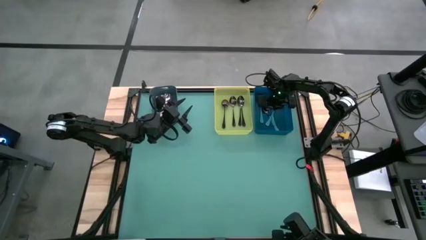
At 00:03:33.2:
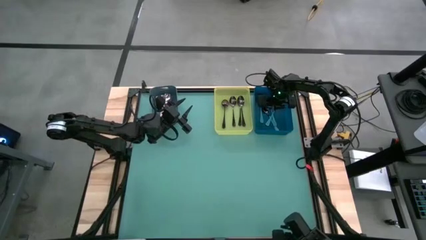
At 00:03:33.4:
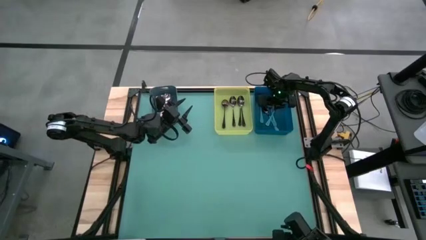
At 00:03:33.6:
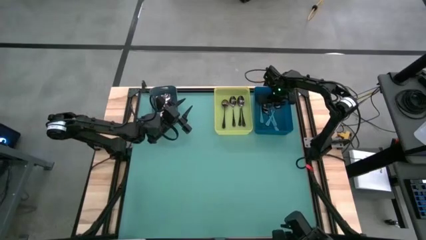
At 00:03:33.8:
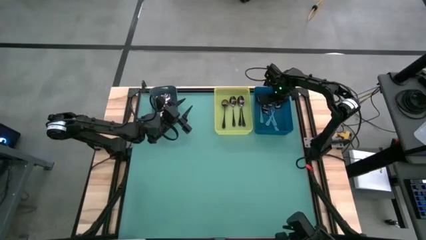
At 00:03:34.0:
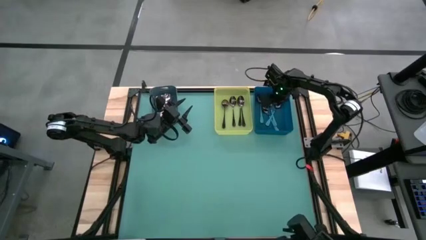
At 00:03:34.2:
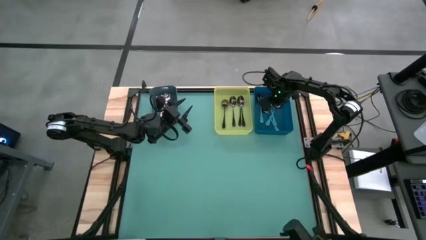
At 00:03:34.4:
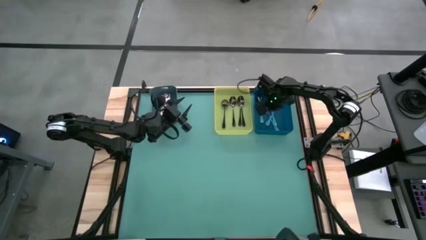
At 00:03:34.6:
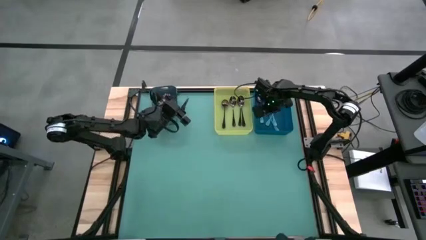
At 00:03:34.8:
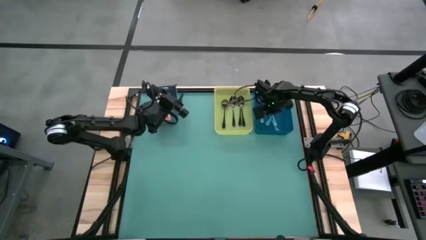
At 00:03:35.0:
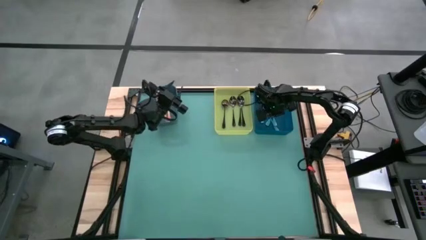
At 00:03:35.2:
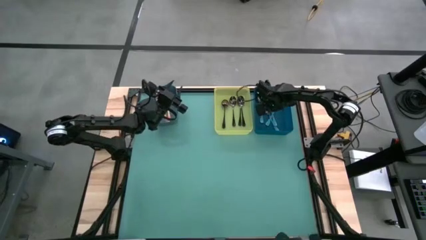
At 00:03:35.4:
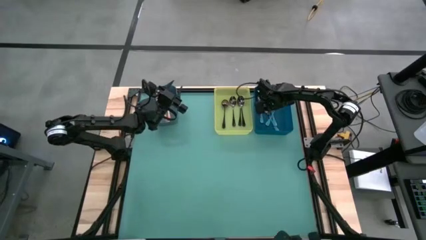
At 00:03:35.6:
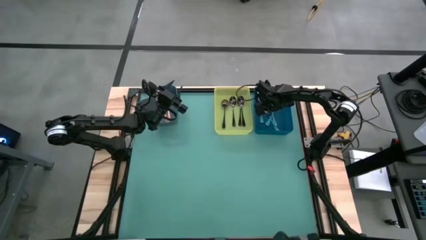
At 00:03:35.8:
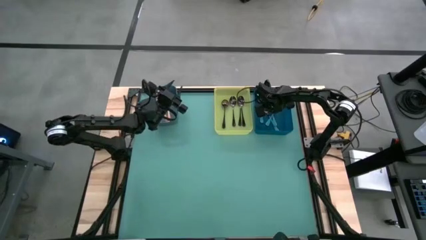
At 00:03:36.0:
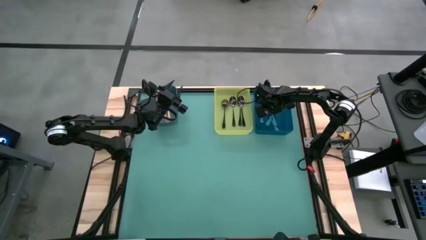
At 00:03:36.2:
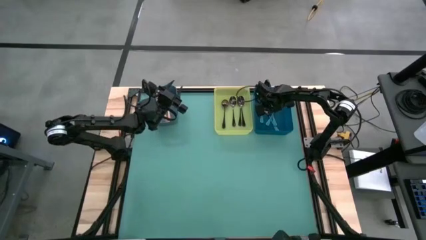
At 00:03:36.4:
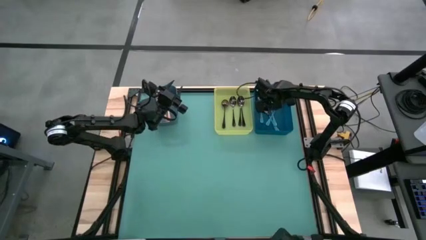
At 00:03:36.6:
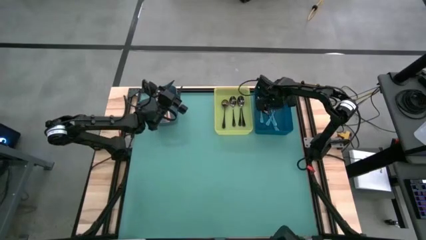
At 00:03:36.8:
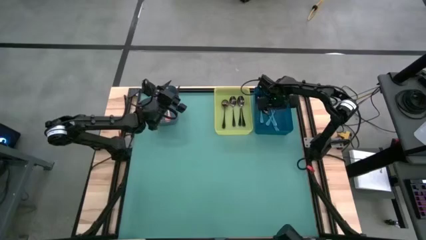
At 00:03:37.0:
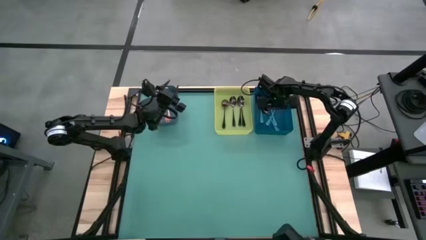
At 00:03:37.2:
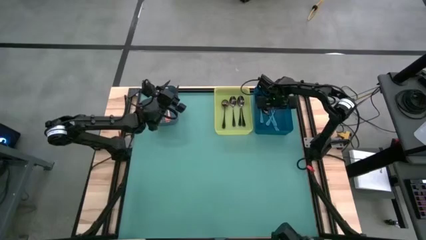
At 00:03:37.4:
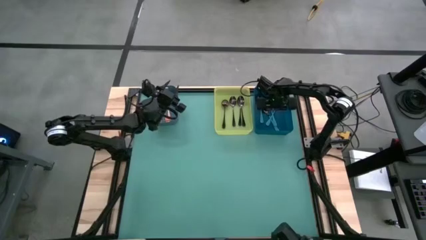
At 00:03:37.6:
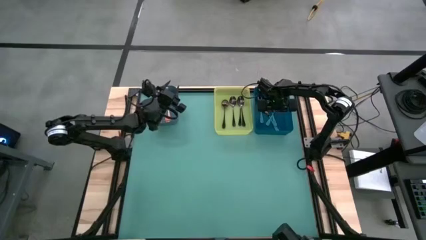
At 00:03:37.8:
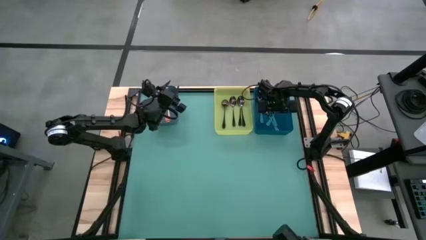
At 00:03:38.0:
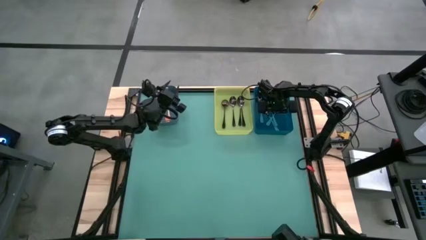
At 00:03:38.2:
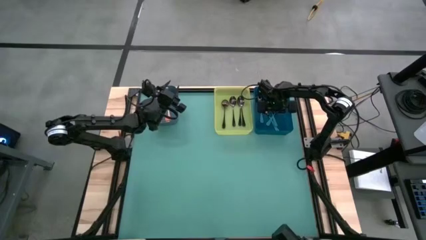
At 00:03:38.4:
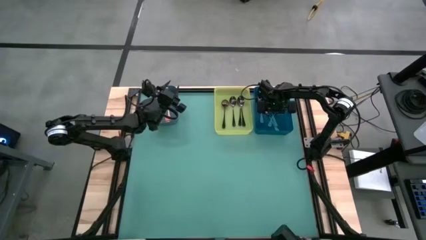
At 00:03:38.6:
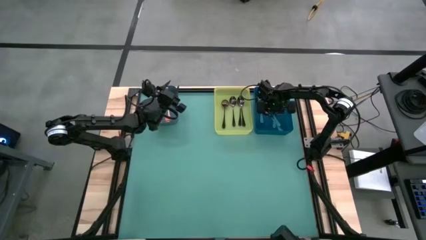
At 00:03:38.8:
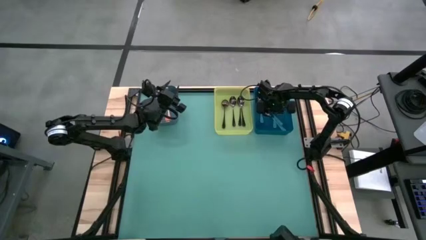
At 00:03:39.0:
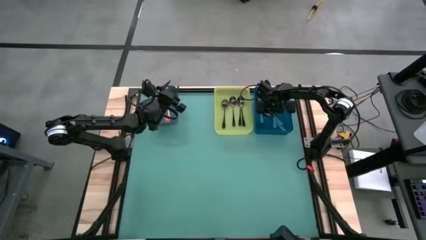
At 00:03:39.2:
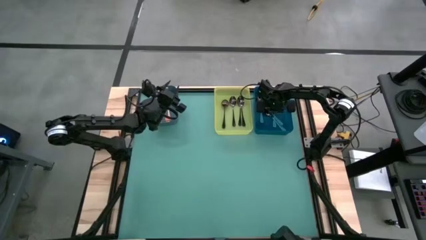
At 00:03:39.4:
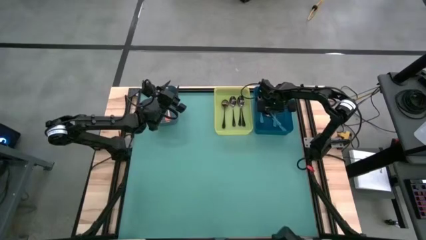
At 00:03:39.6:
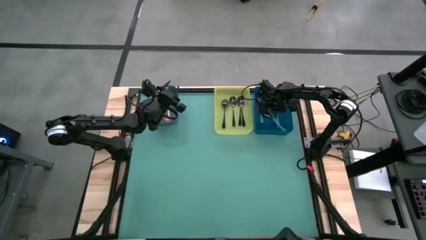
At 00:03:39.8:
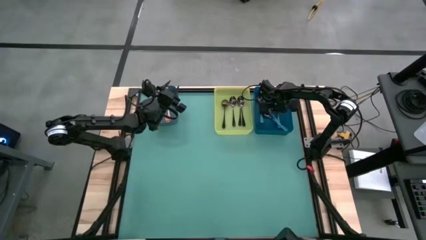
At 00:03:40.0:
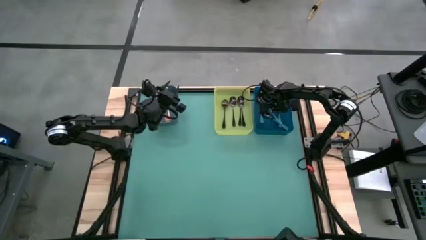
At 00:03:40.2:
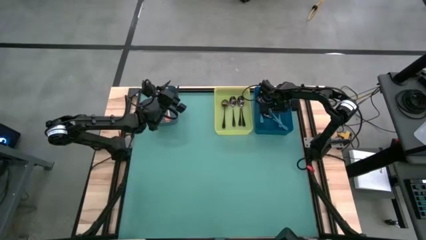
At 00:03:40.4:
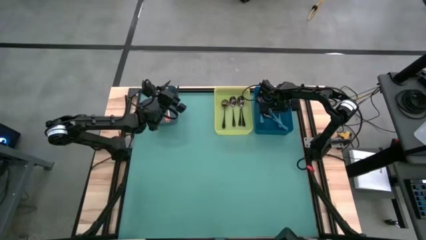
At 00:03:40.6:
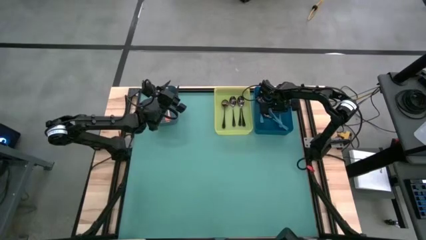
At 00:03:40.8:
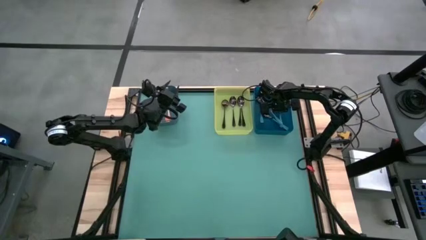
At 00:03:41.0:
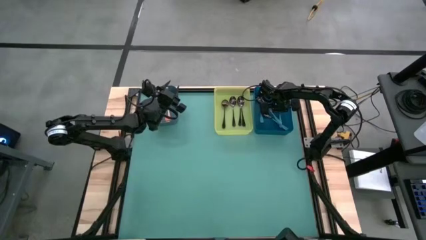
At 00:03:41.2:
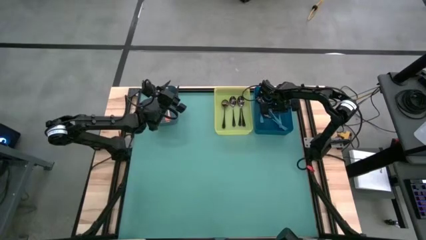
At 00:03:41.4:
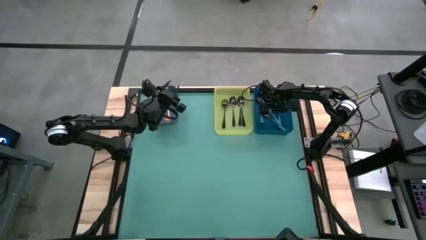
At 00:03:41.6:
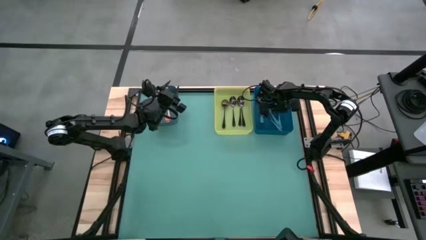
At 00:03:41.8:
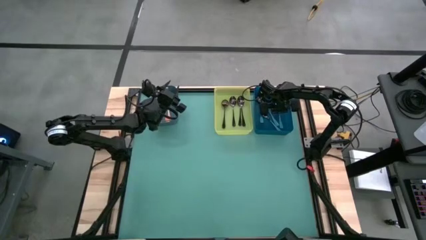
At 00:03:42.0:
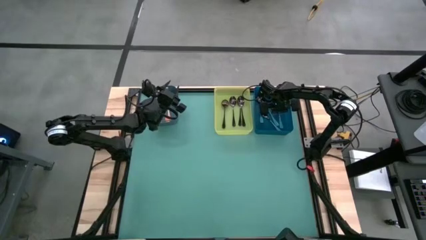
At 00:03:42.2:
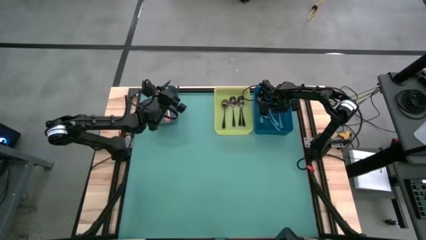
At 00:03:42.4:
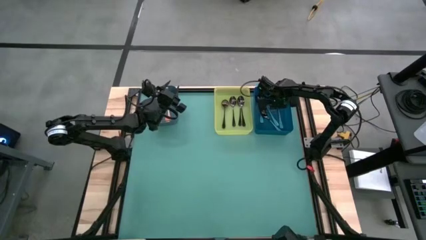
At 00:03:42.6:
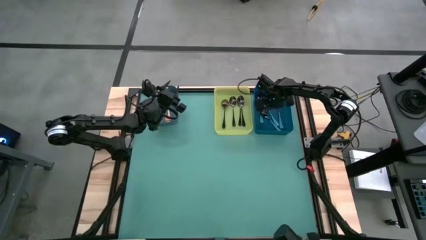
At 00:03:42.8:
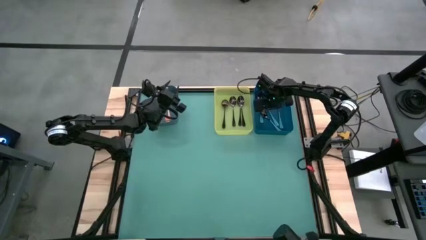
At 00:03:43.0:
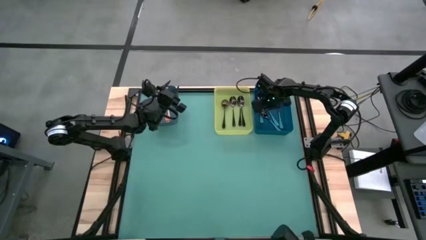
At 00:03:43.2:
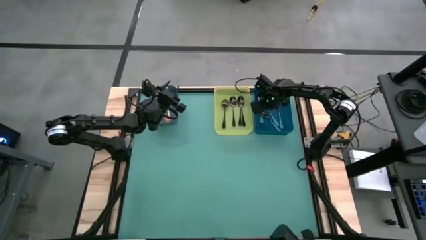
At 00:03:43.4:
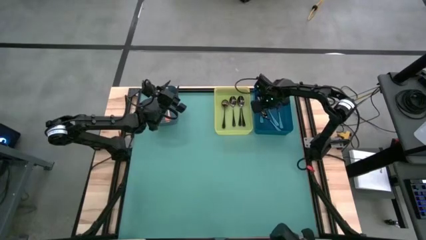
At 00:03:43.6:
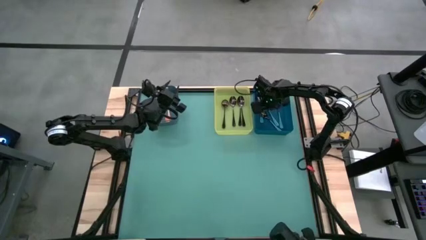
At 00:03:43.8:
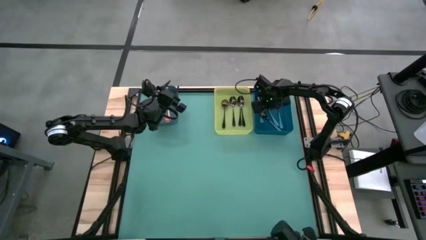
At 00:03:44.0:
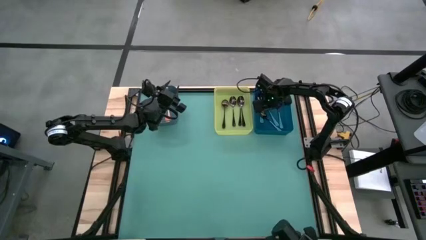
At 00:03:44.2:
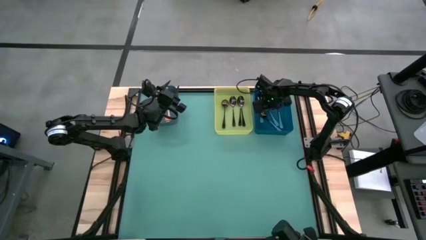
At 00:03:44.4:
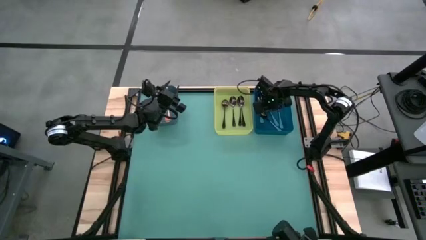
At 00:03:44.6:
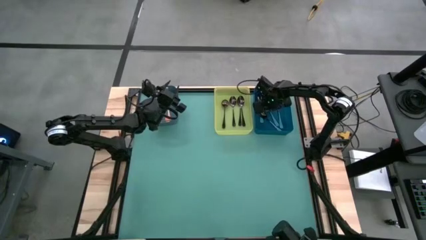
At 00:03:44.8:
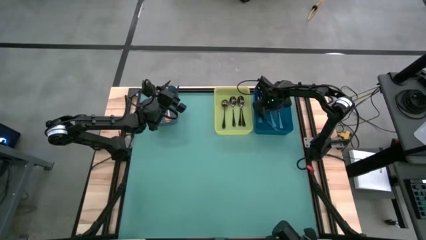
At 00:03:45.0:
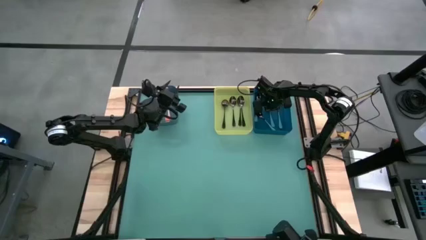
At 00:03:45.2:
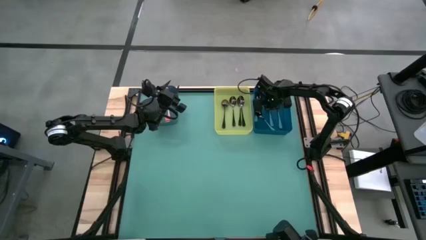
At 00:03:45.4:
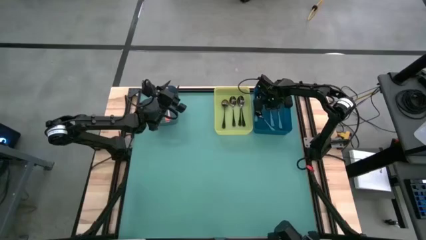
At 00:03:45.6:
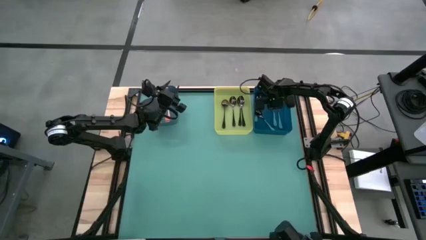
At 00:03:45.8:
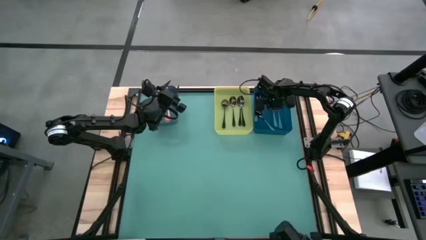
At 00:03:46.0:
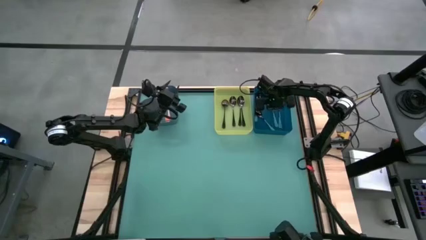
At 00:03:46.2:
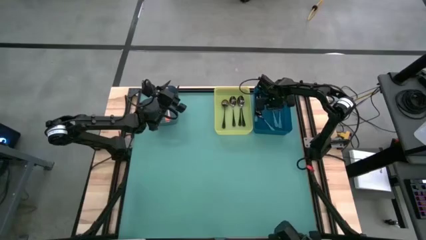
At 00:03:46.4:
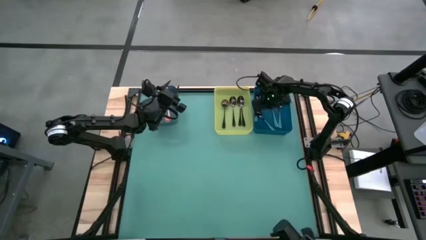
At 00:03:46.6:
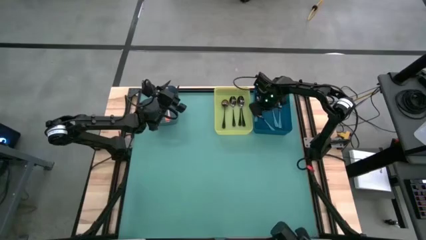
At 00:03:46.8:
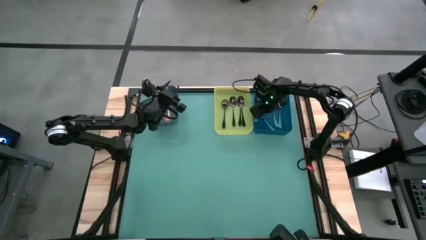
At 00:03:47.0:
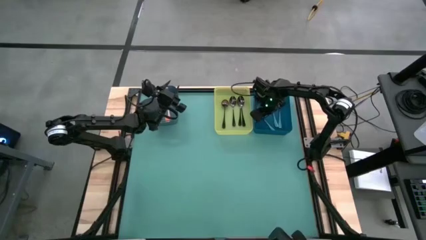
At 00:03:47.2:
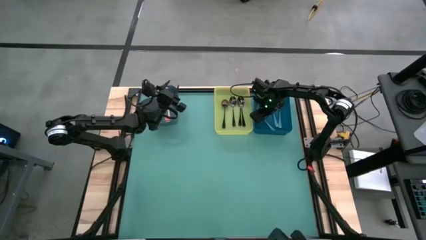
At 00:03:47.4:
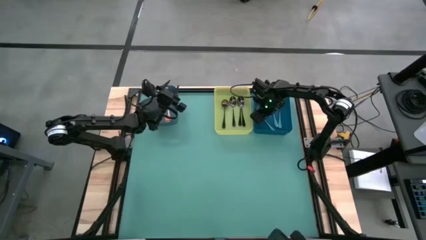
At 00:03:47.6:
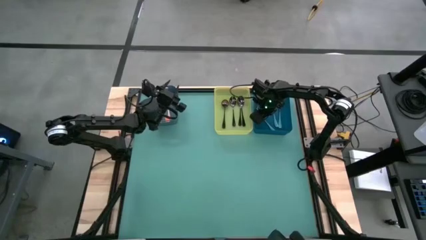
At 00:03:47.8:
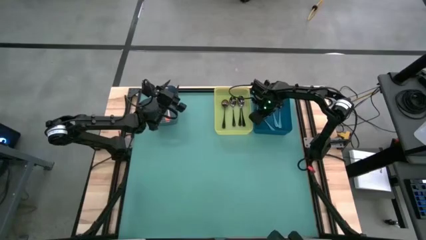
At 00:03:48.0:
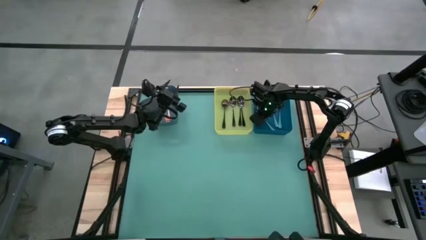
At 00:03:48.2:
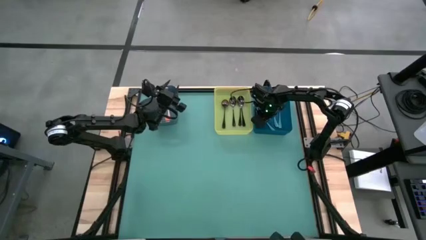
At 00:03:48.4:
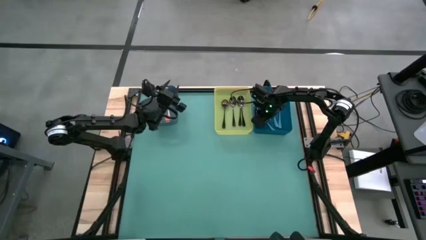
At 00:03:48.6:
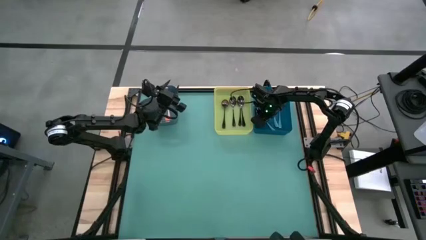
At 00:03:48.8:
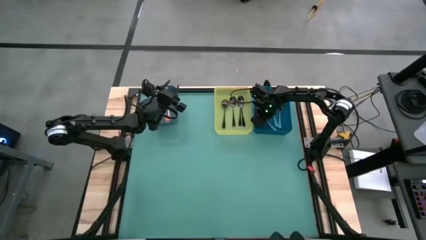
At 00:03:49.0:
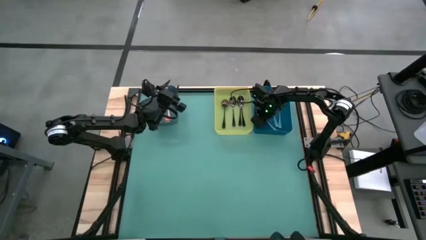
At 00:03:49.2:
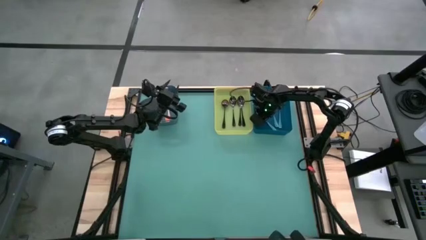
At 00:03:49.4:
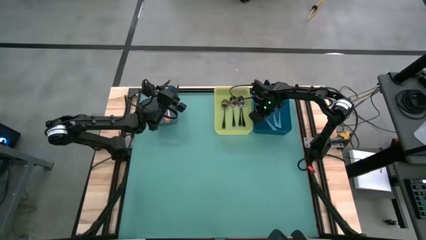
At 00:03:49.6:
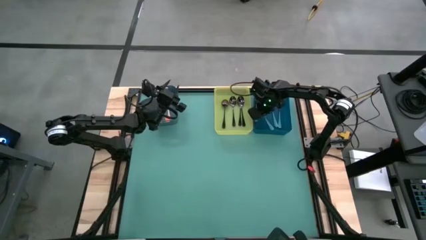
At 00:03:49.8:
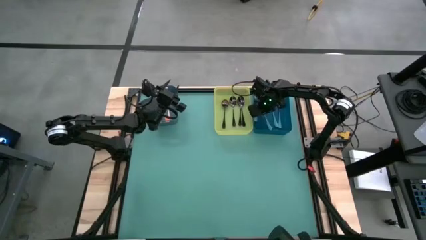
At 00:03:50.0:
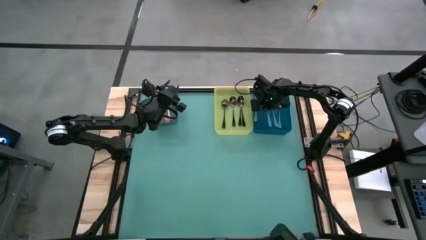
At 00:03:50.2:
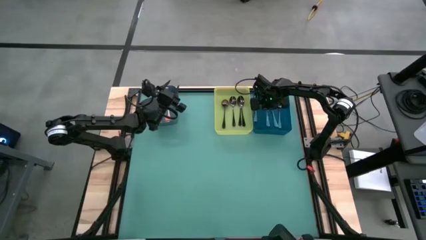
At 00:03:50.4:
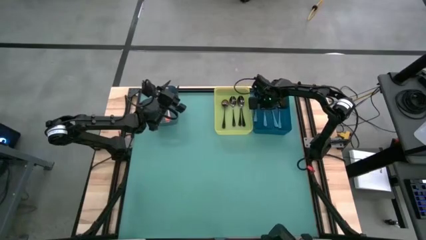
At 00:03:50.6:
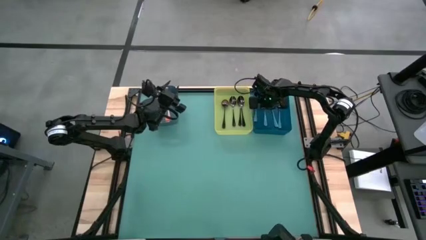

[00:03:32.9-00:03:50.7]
Task: Sort silverware by color (type)
Adjust the blue spoons on the blue bin
